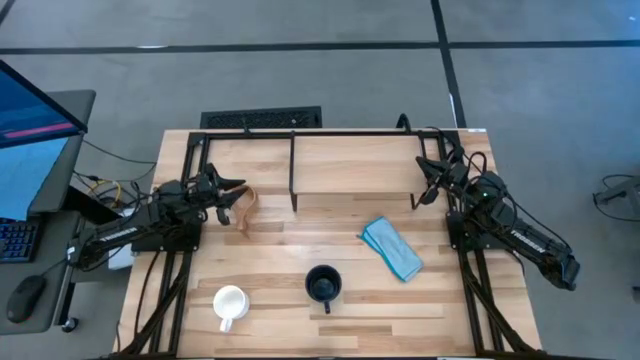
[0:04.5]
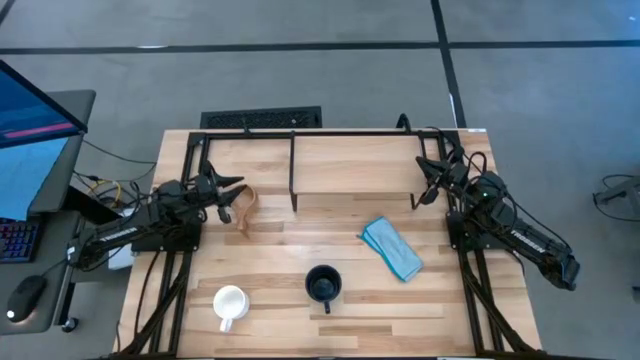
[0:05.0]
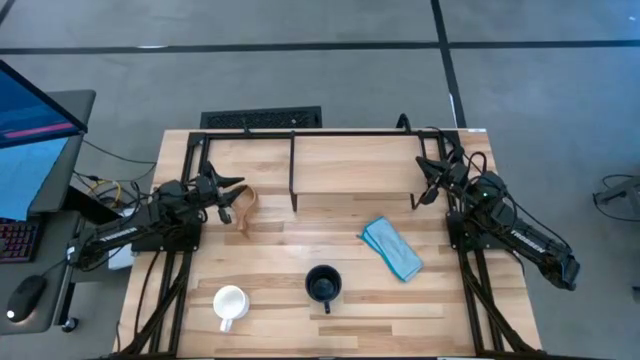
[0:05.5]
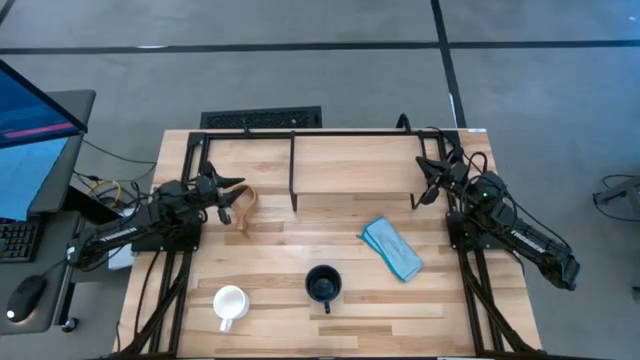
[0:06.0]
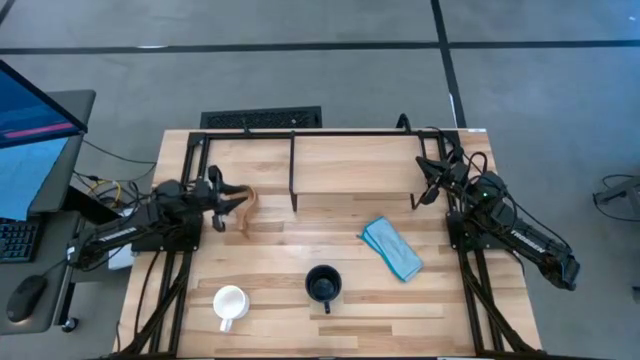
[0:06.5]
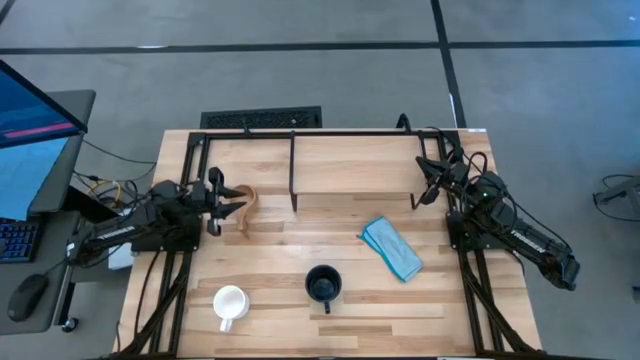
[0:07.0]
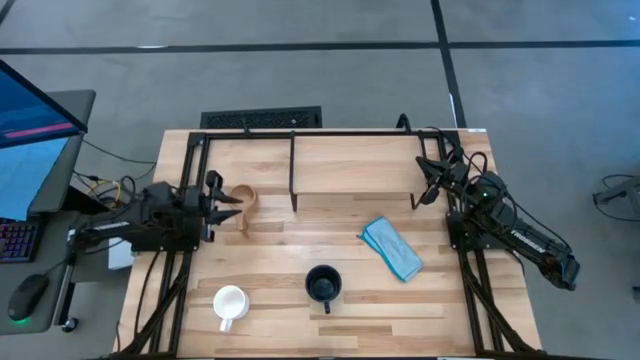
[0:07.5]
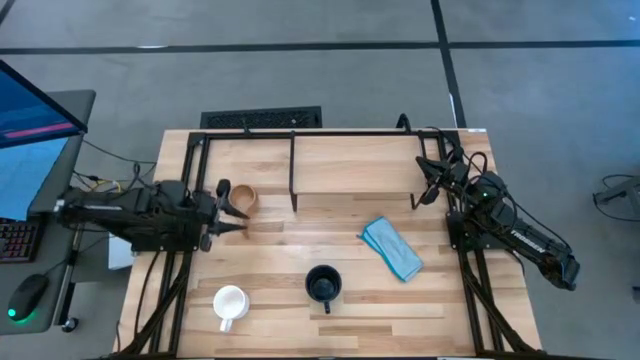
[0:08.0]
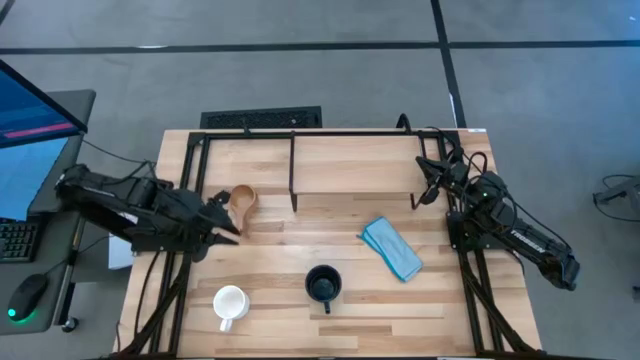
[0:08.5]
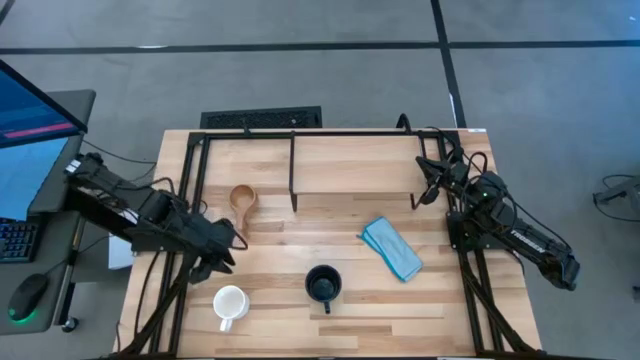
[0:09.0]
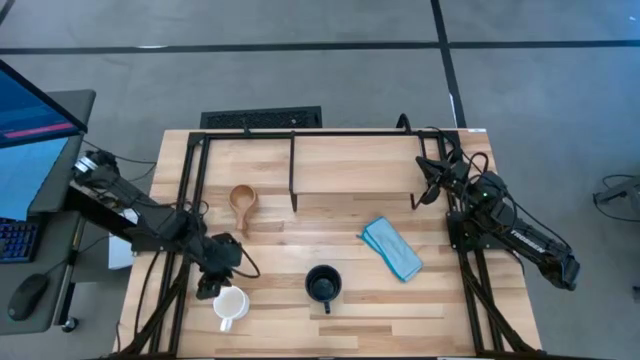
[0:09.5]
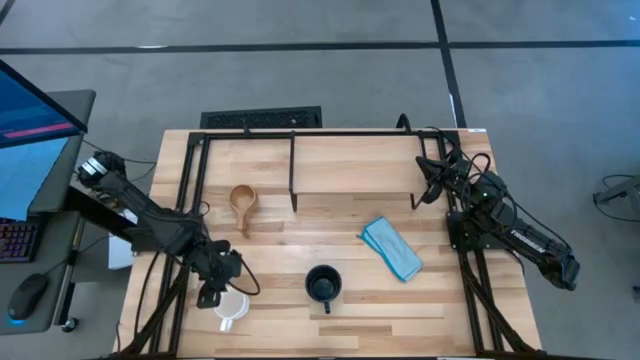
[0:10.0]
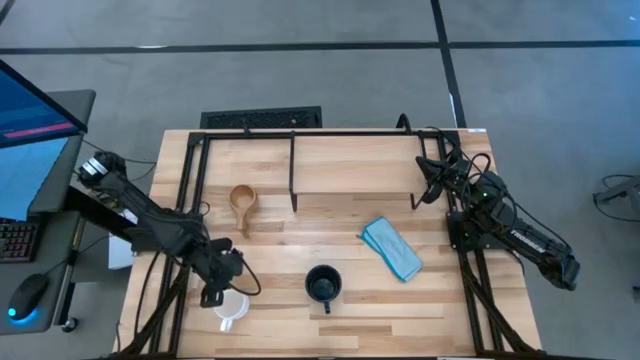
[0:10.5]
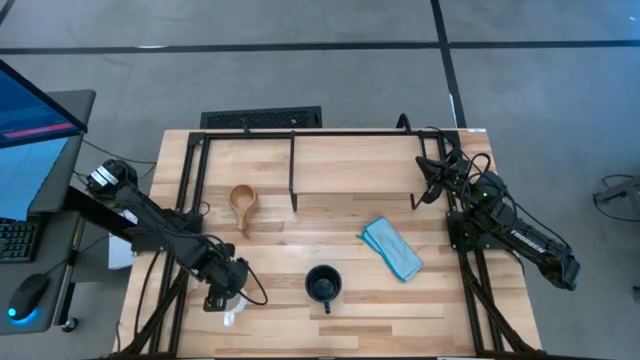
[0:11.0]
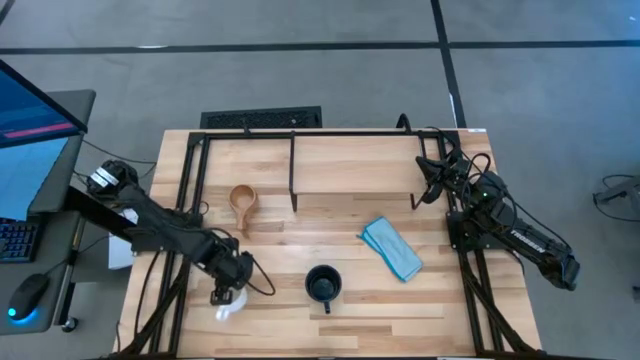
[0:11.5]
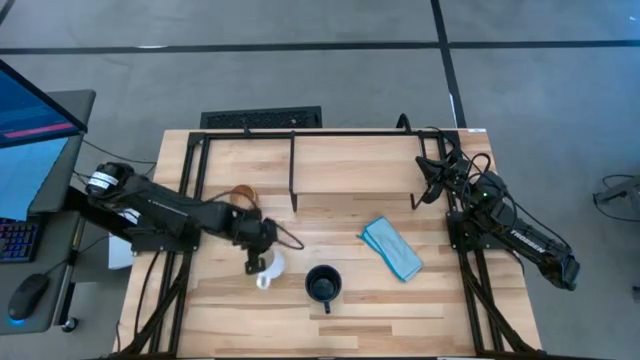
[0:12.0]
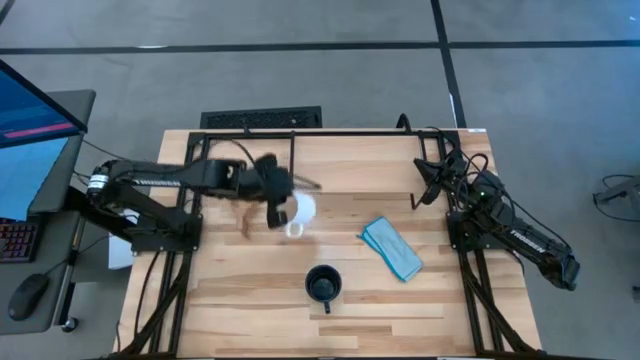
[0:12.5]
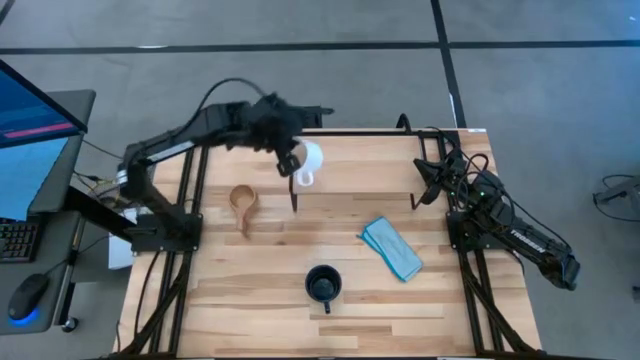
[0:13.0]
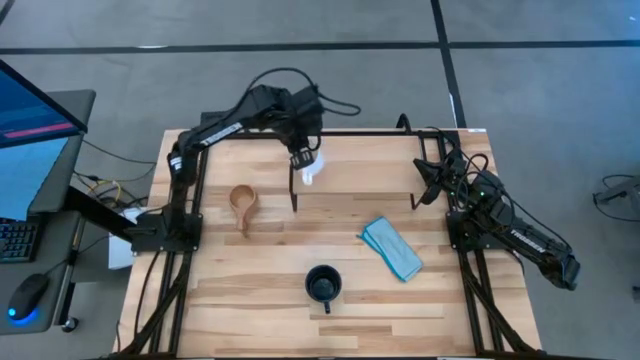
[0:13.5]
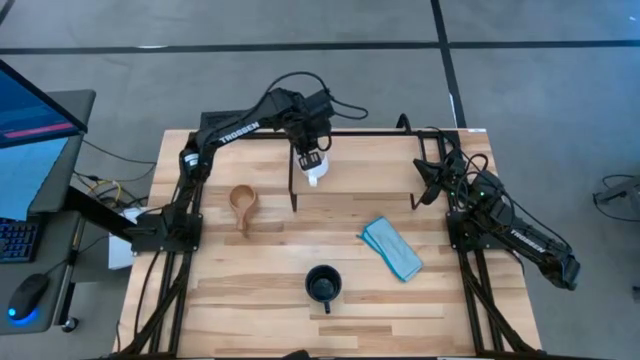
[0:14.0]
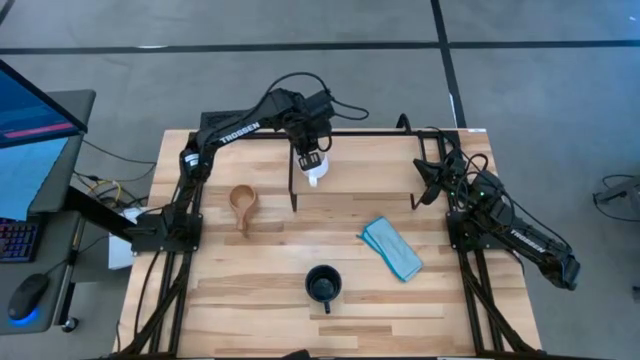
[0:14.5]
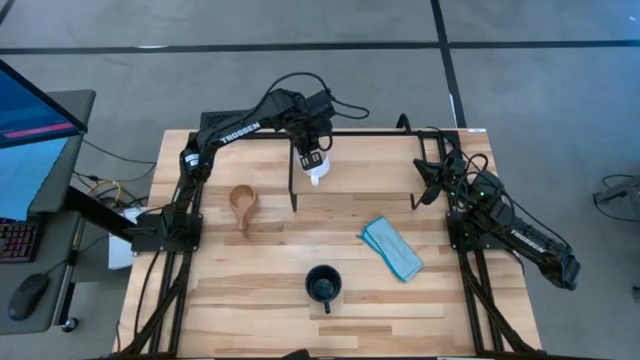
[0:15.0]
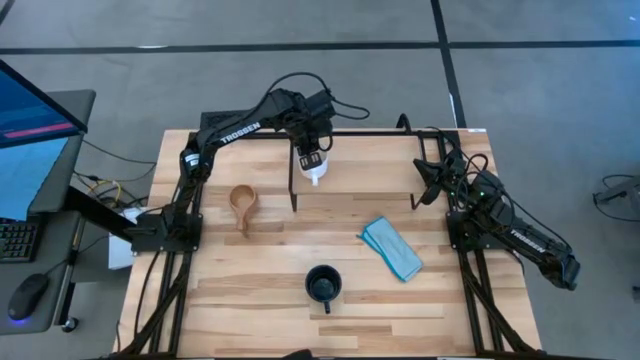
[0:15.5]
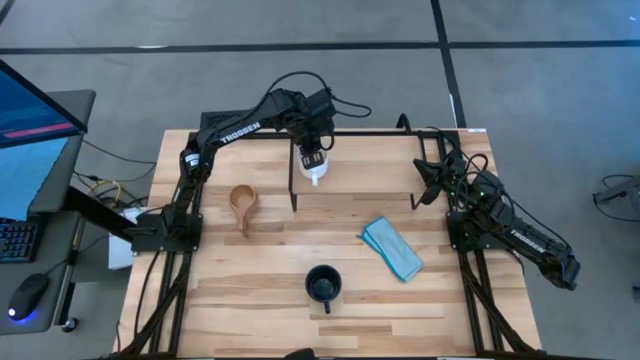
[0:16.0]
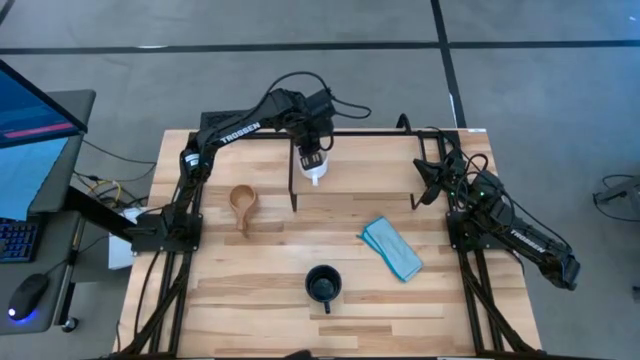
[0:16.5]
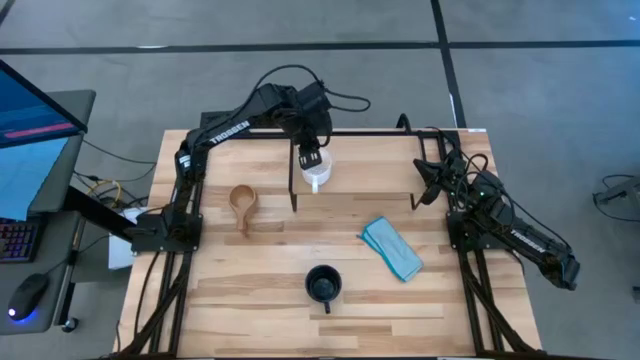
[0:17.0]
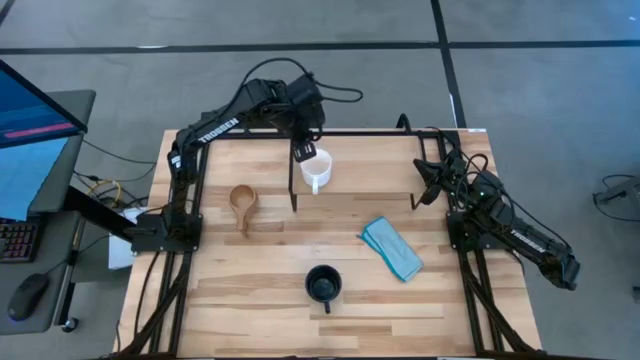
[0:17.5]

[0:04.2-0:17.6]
Task: Stack small to large cups/mugs on shelf
Put the white mug on the shelf

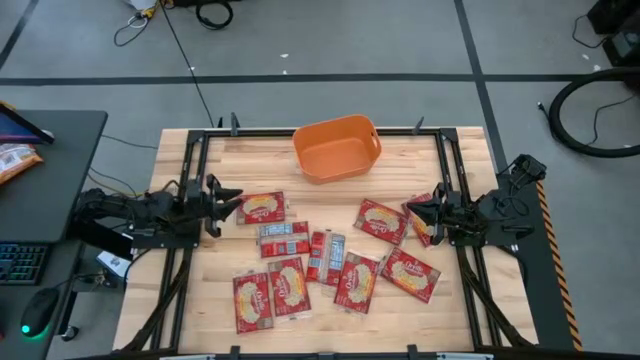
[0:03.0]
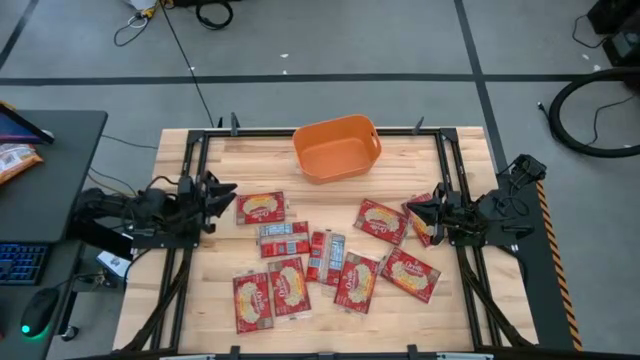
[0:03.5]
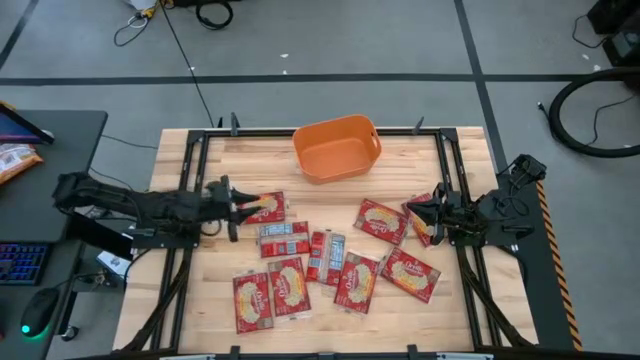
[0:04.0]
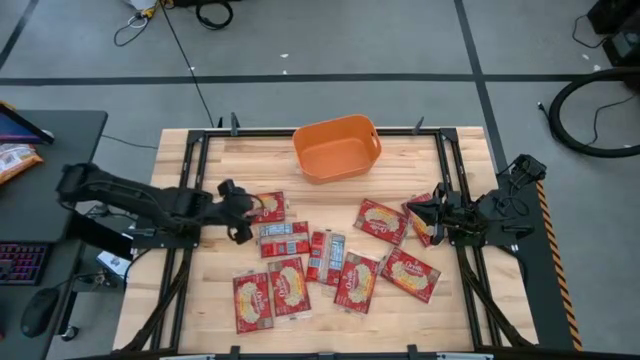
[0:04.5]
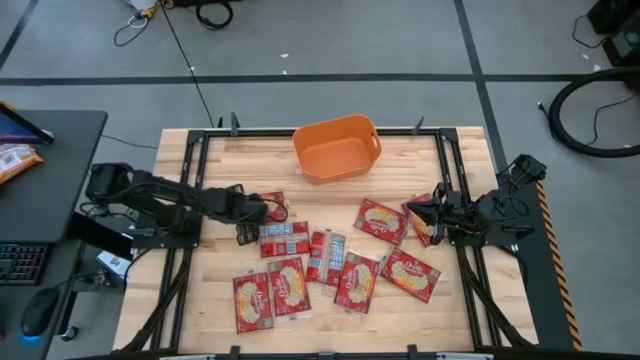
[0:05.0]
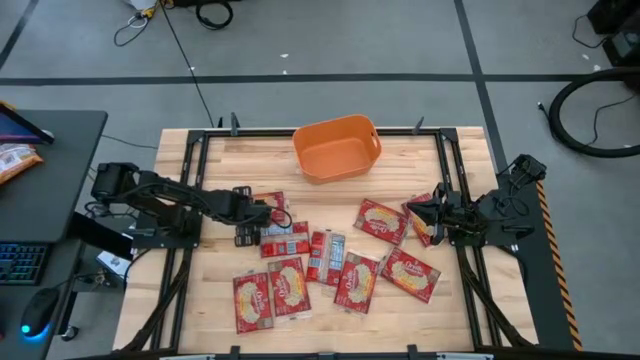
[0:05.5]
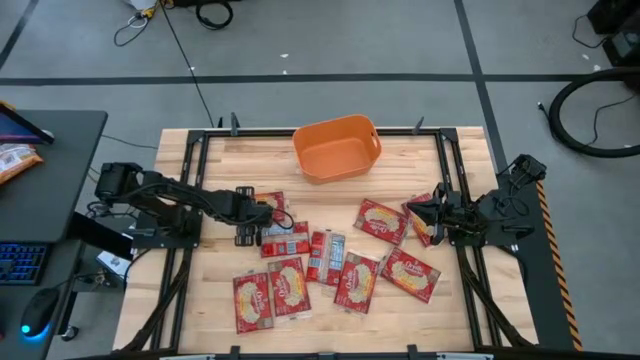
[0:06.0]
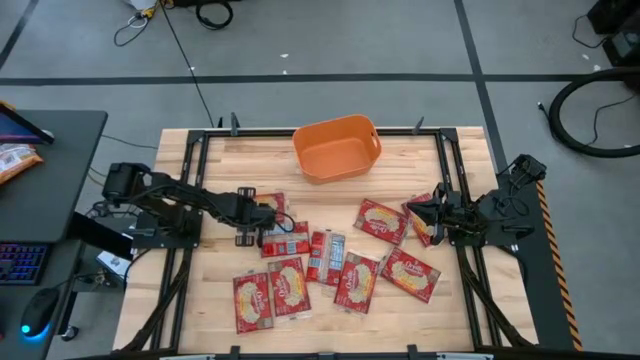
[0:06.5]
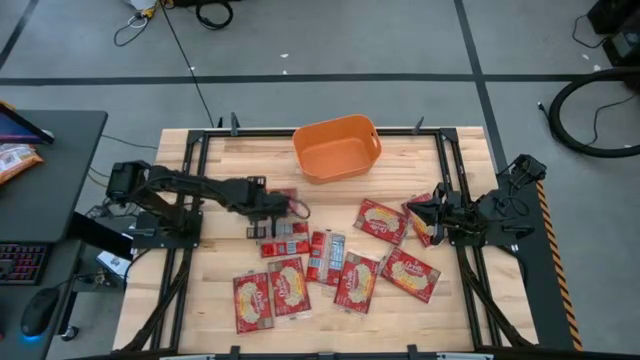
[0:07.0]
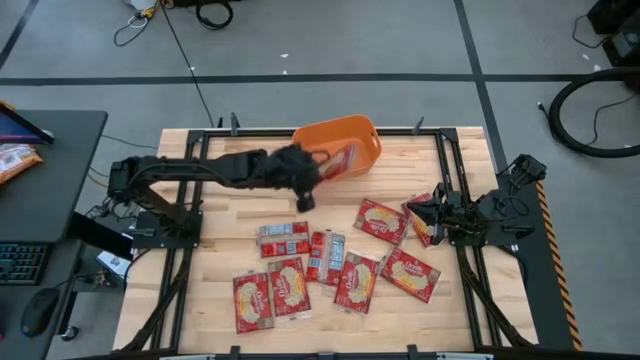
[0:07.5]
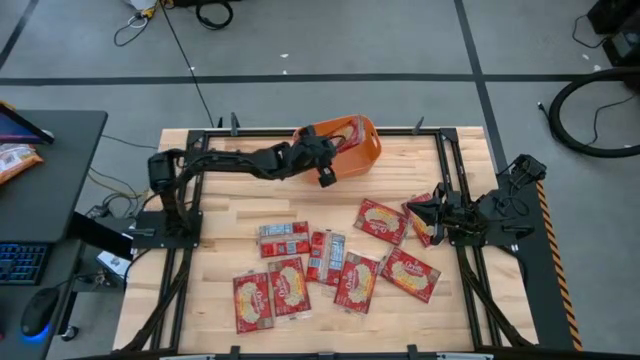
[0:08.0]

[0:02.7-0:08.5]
Task: Sort popcorn bags into baskets
Put the popcorn bag into the bin

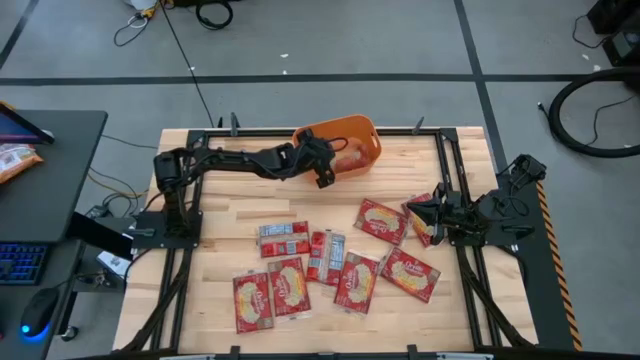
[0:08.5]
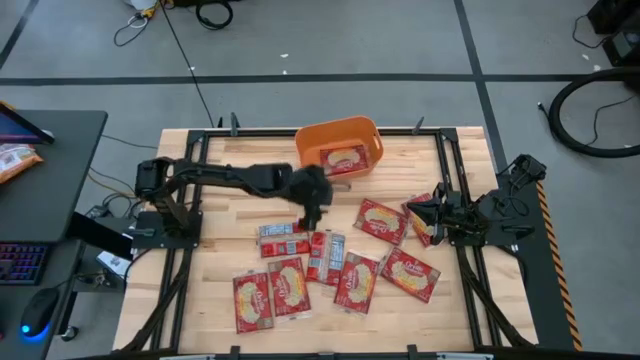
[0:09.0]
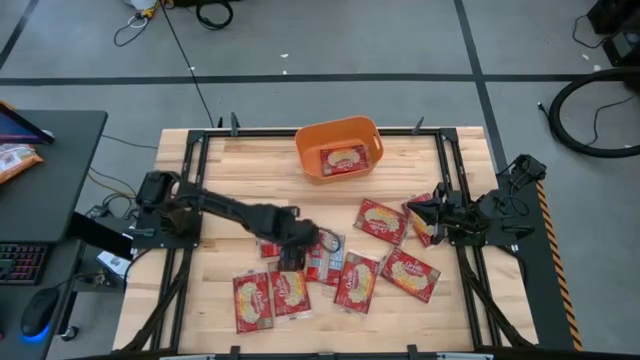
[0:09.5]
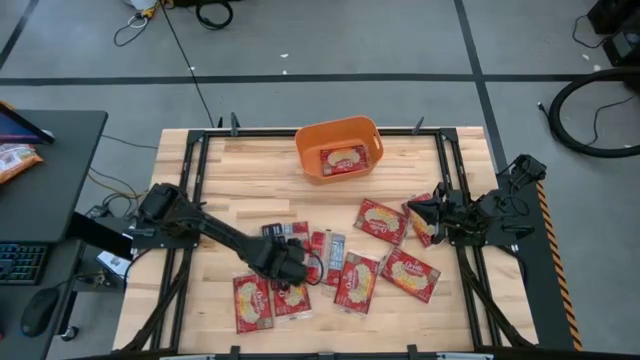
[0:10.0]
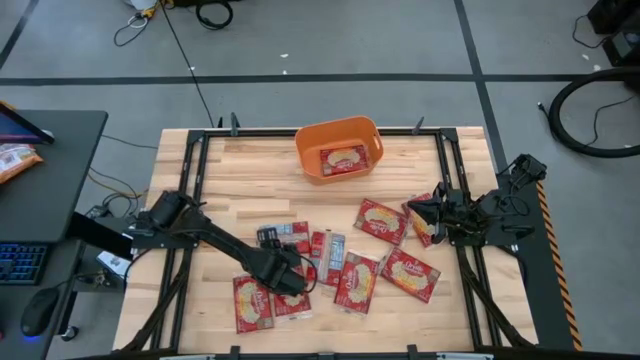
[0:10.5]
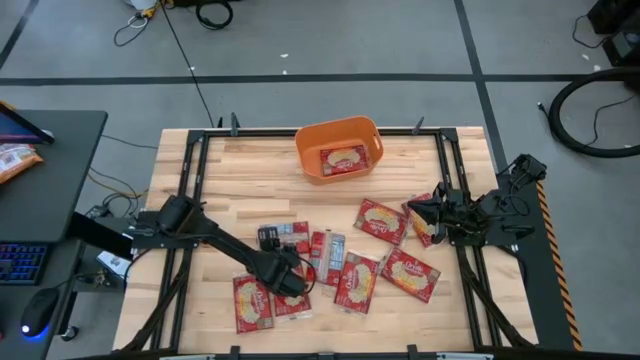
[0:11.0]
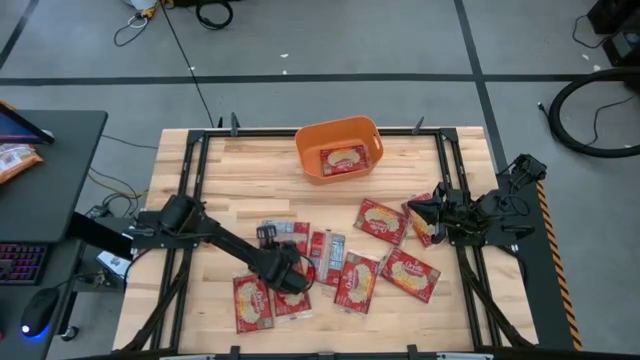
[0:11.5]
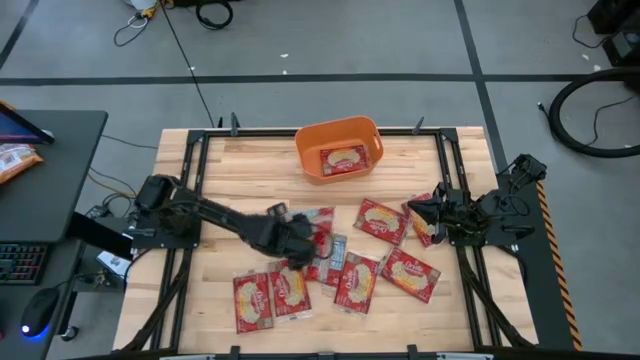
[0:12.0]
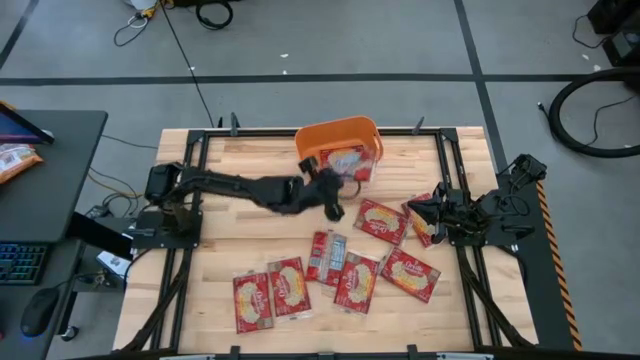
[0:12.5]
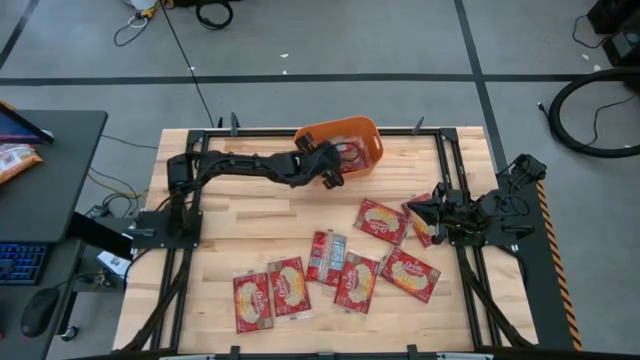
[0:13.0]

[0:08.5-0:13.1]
Stack the popcorn bag on the top of the popcorn bag
